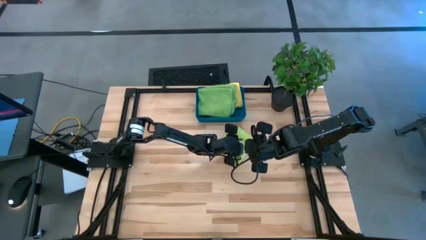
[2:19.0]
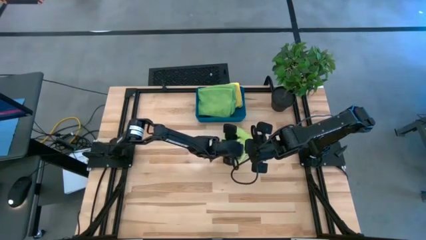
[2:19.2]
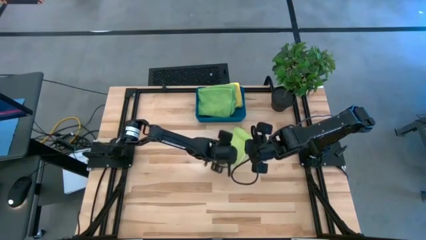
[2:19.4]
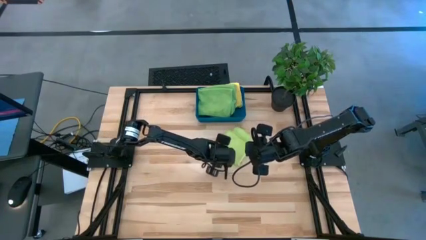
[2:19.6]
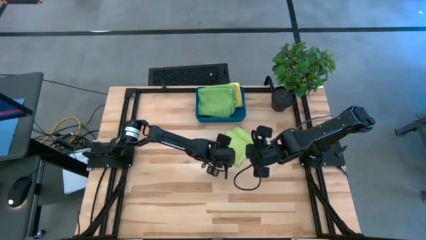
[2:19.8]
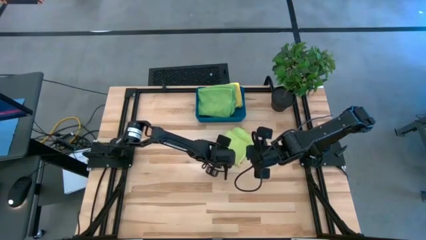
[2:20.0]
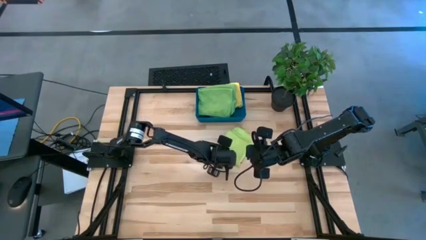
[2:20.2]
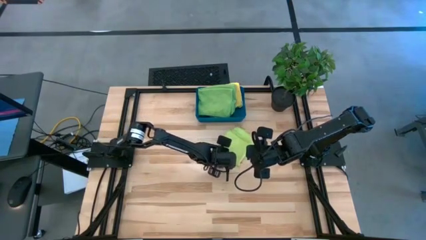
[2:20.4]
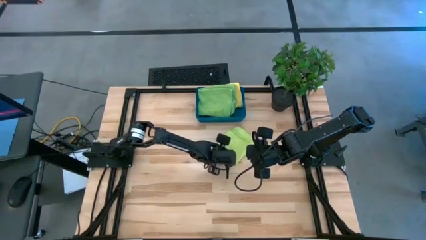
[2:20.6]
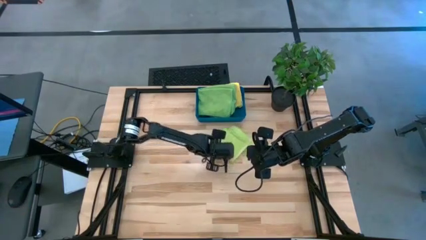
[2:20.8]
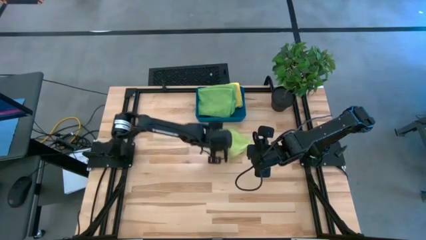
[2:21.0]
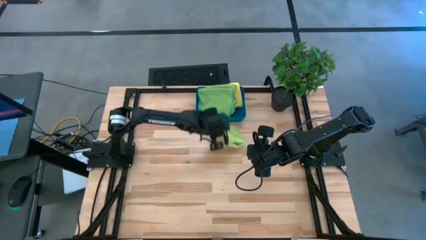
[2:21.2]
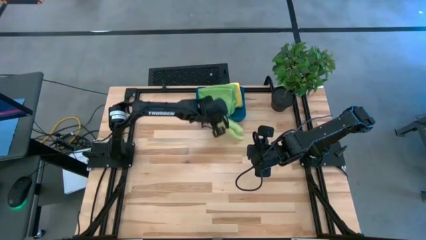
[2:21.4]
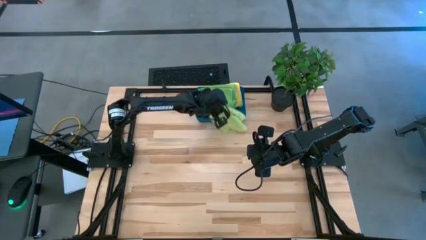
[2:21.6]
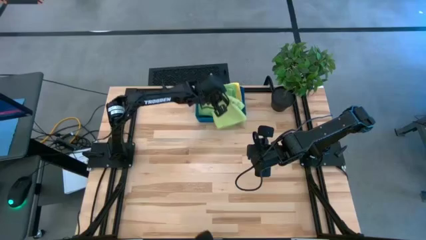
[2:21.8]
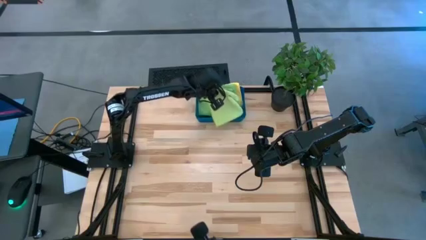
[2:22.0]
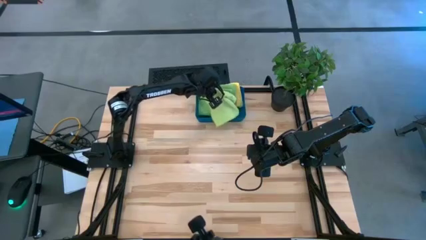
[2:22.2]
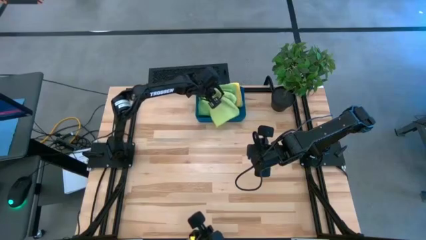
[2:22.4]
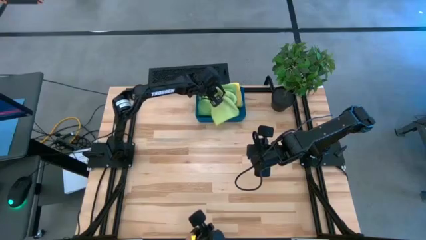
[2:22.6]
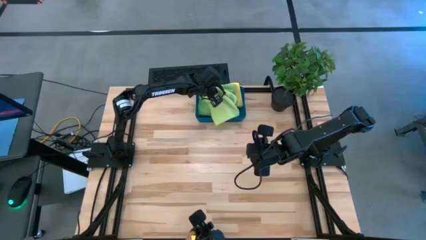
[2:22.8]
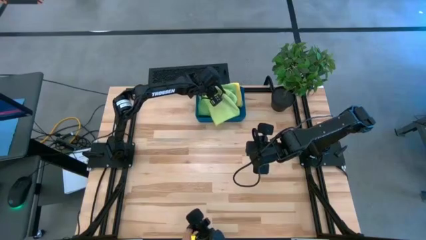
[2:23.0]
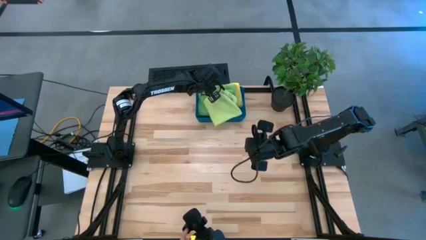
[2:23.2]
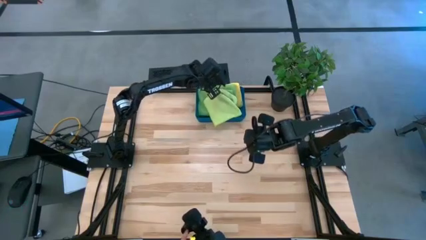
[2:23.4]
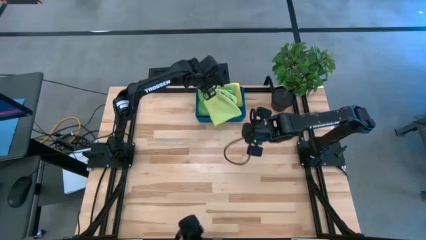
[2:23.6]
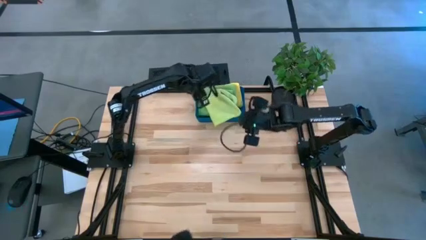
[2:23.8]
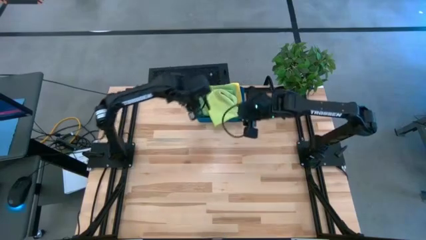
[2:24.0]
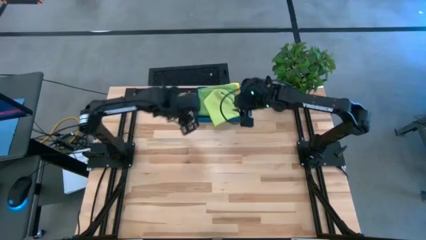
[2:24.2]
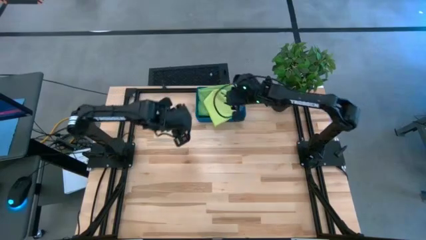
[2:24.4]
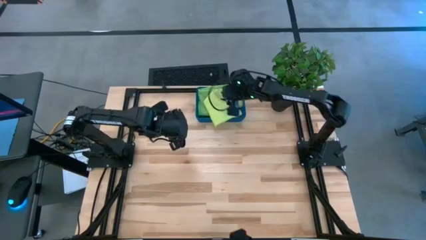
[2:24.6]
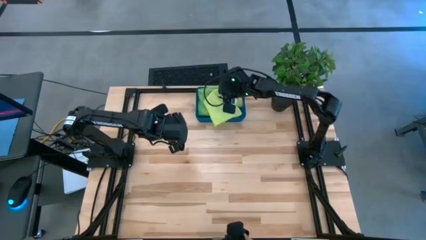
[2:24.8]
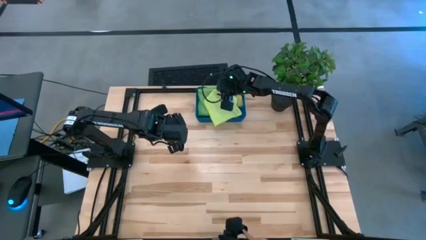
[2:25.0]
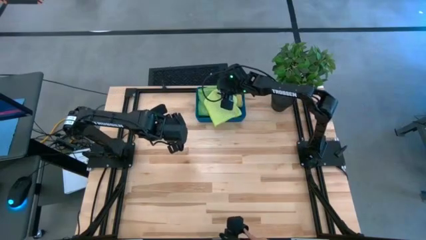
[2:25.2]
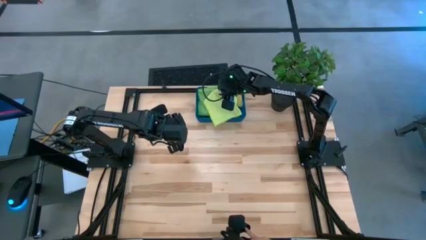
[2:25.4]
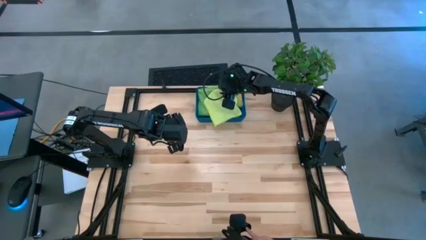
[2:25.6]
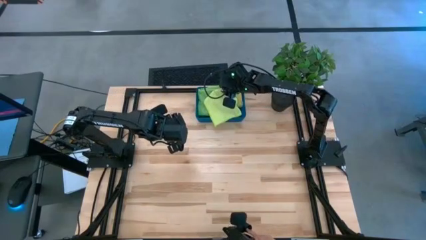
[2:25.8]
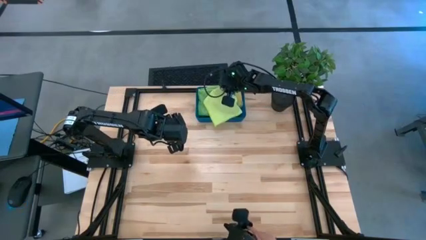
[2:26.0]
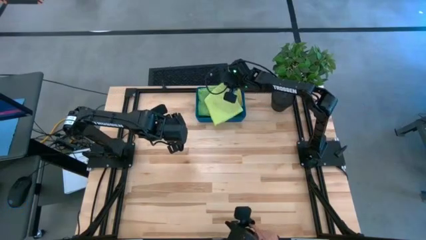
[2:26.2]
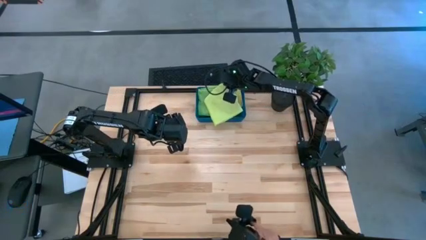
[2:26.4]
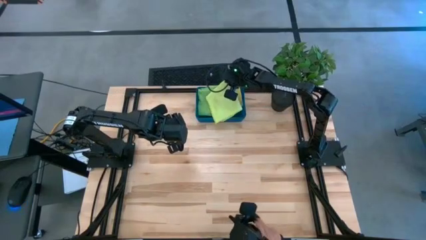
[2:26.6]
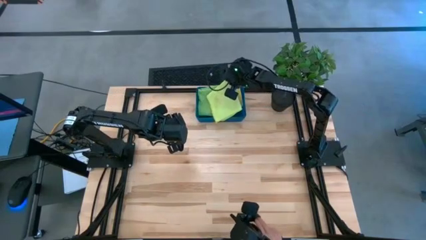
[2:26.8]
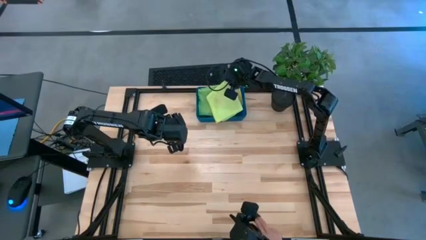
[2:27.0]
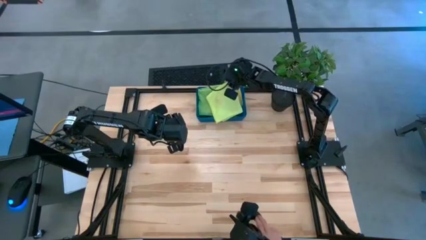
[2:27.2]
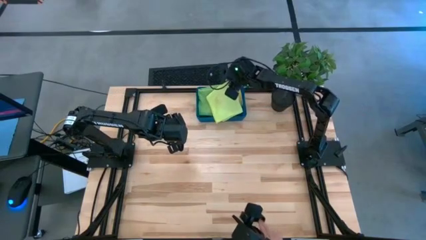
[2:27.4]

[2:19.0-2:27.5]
Task: Fold microfiber towels
Put the folded light green microfiber cloth into the blue bin

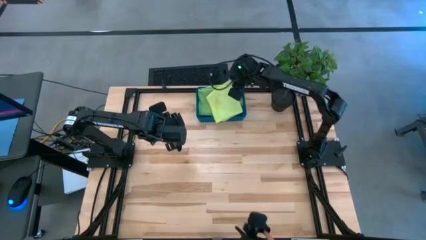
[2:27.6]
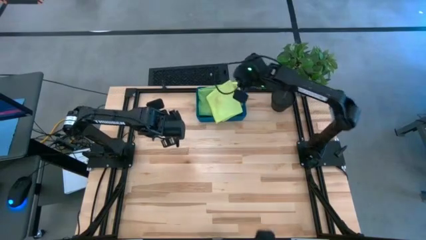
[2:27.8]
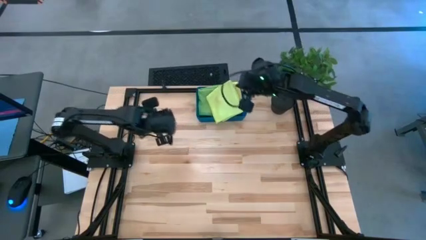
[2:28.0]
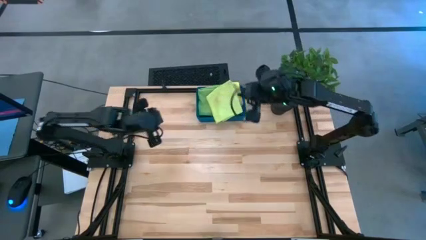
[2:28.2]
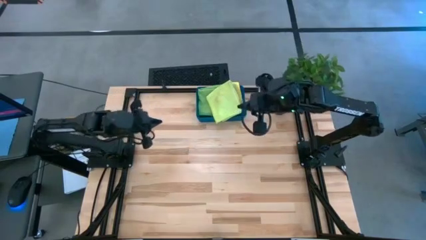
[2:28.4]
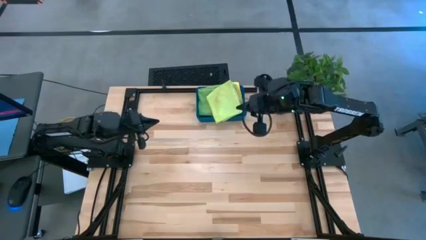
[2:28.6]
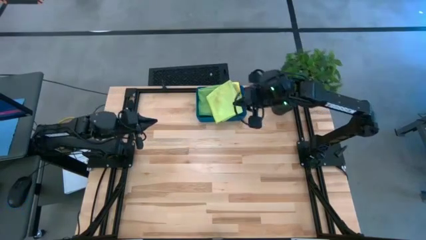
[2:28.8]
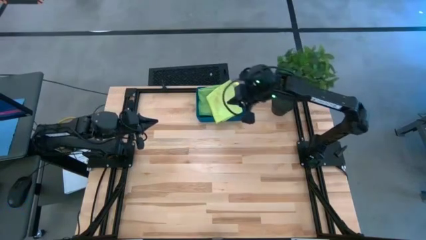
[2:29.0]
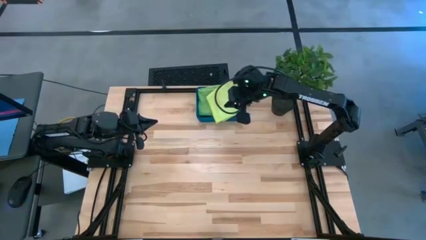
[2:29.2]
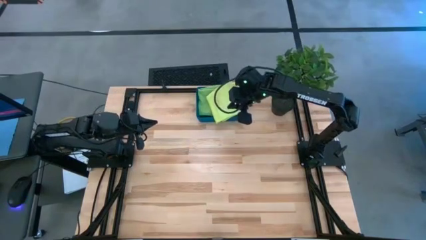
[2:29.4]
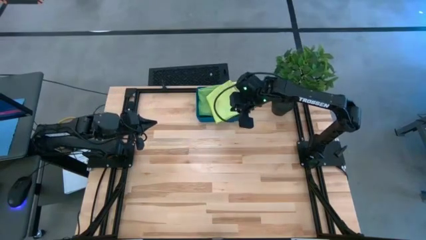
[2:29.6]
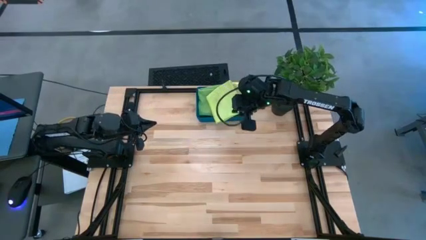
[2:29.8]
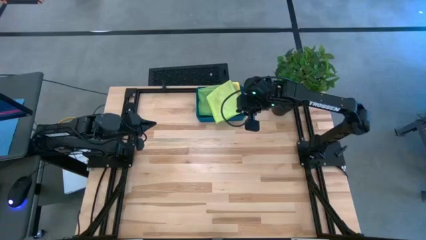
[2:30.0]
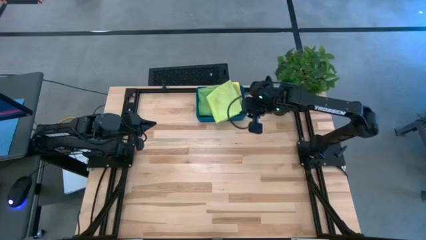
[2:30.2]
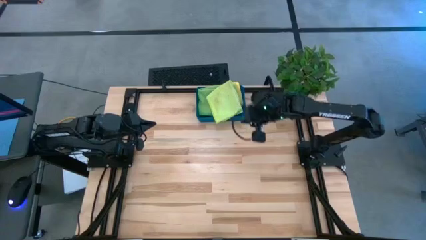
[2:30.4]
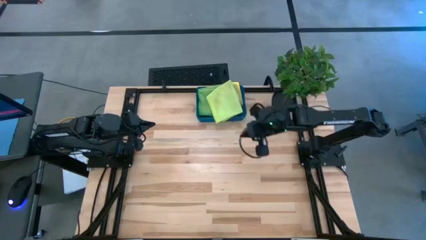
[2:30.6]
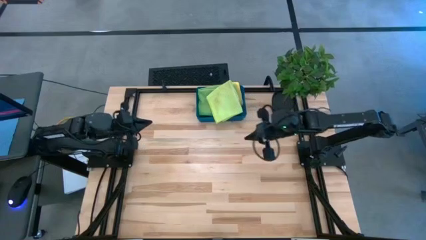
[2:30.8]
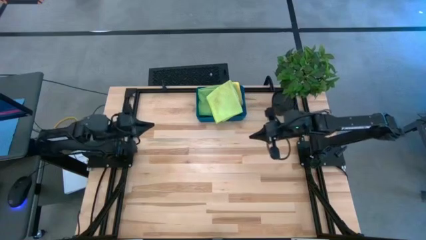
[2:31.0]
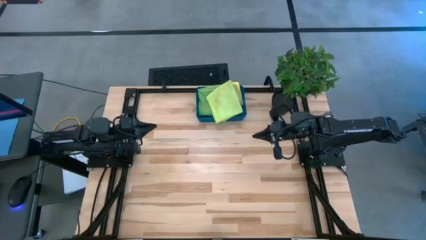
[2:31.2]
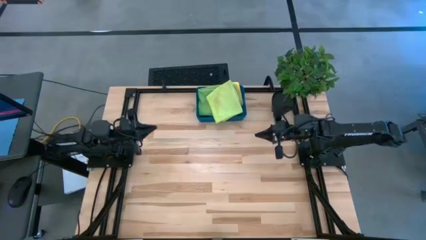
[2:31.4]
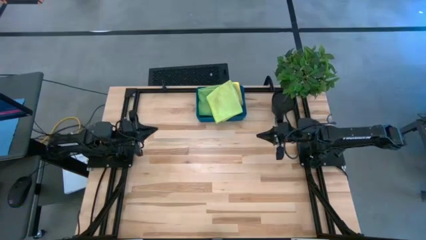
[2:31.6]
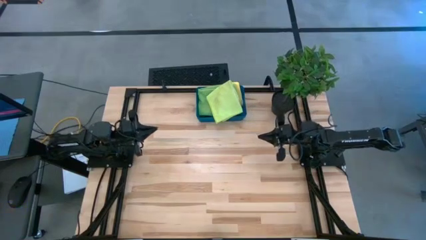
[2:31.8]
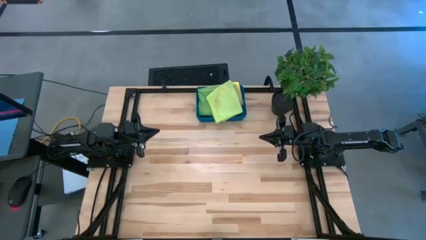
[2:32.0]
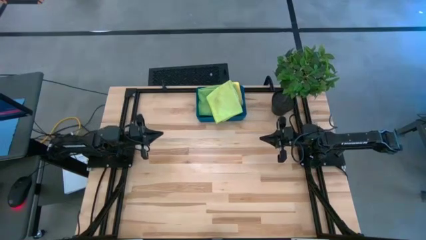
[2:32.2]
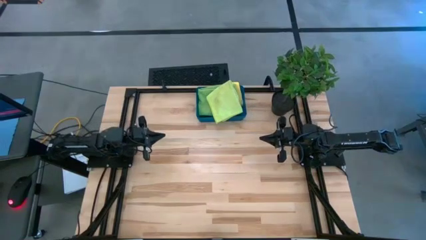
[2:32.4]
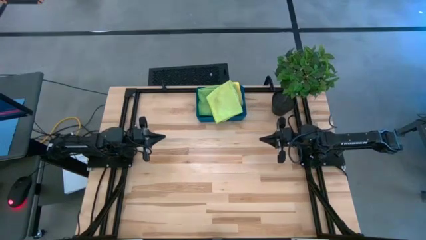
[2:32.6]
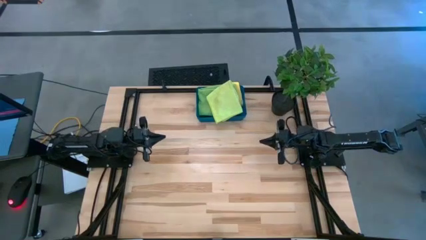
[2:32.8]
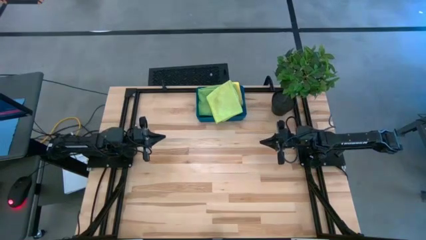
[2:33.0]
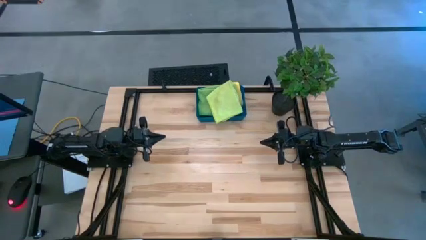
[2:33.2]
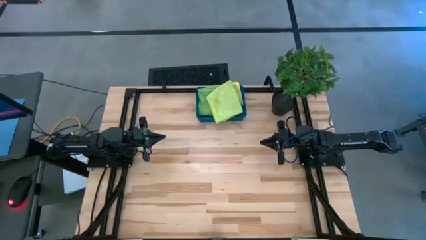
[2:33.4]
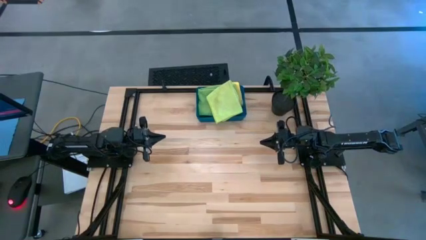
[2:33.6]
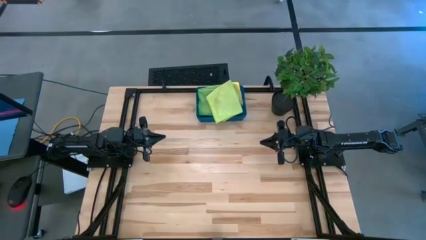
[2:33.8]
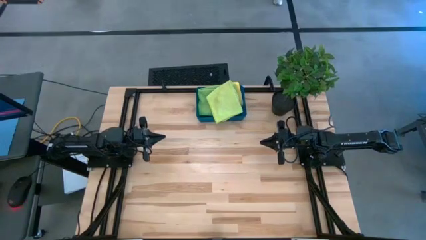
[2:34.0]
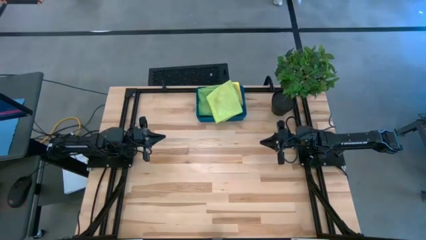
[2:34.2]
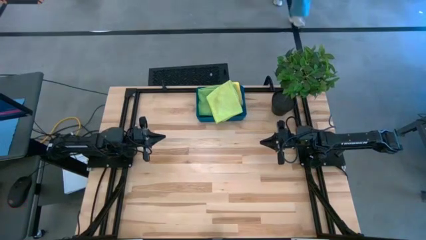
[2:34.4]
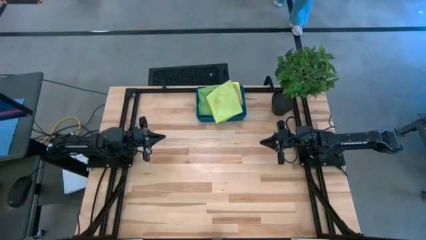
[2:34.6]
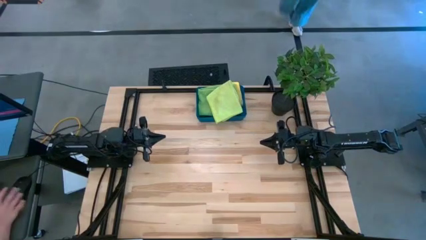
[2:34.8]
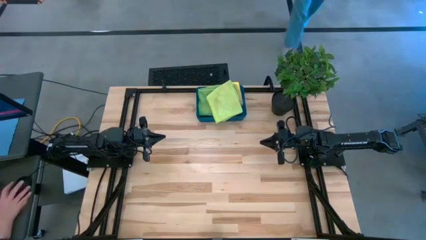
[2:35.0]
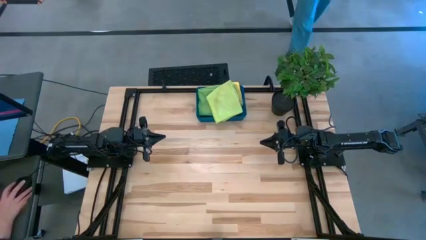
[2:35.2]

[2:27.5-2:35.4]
Return to Home Position
